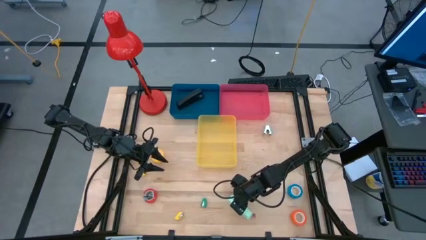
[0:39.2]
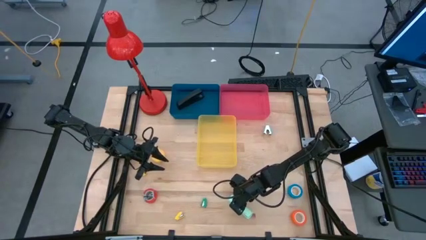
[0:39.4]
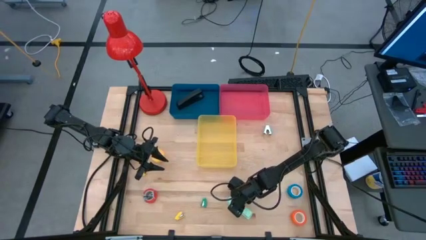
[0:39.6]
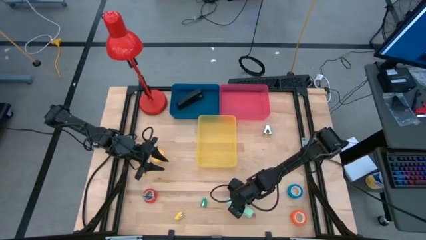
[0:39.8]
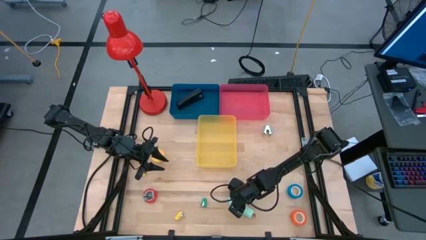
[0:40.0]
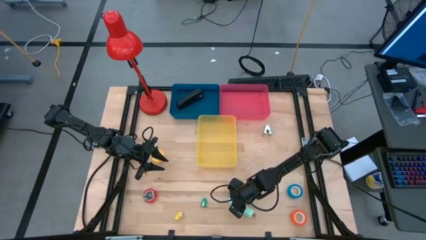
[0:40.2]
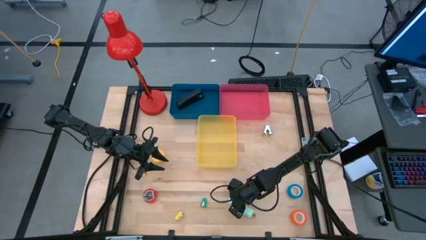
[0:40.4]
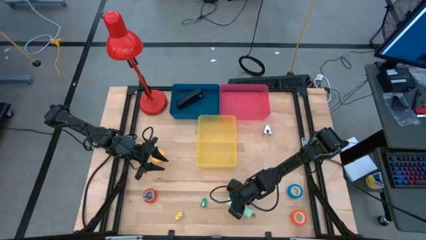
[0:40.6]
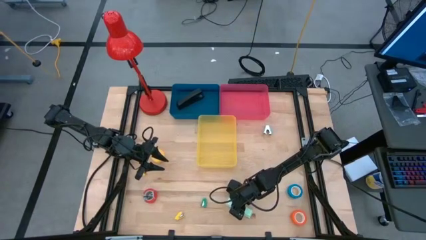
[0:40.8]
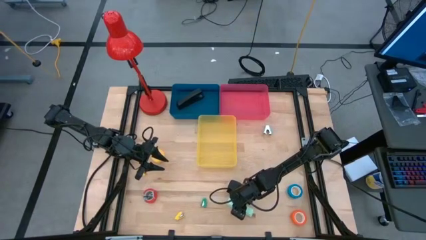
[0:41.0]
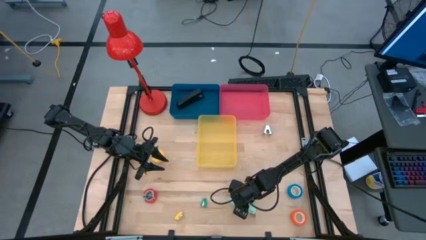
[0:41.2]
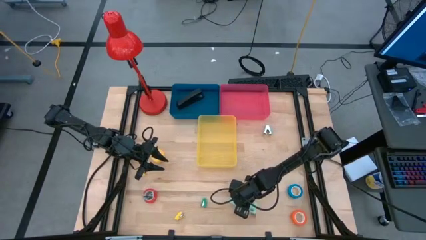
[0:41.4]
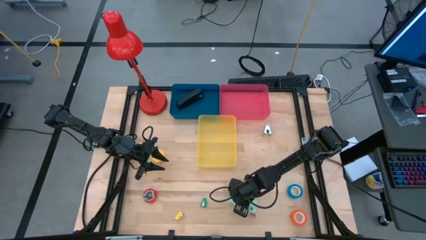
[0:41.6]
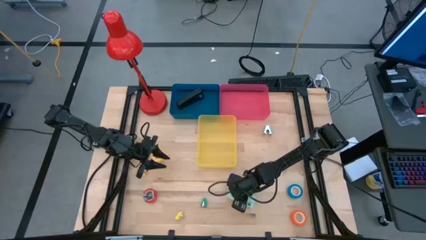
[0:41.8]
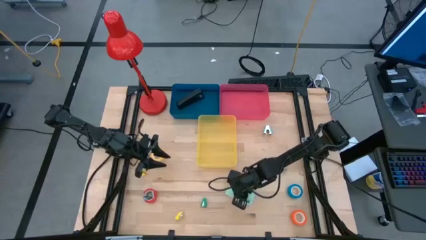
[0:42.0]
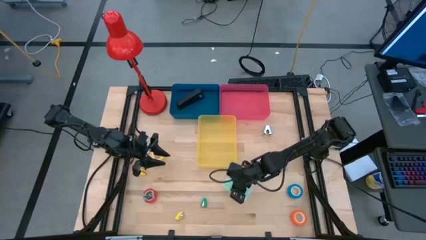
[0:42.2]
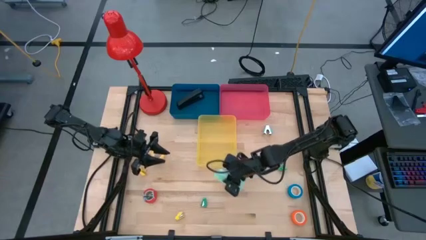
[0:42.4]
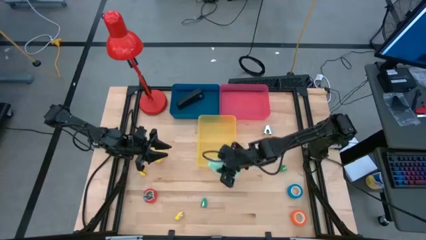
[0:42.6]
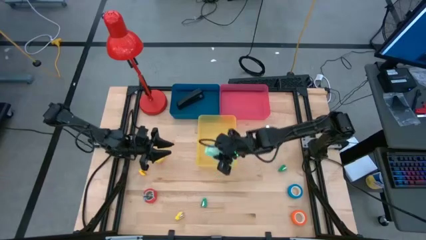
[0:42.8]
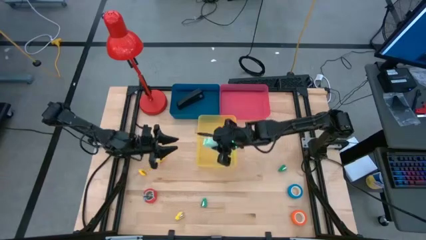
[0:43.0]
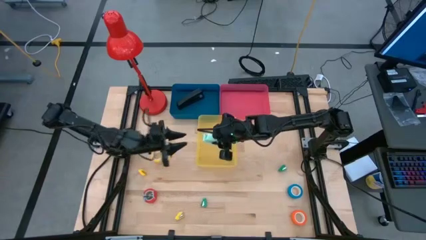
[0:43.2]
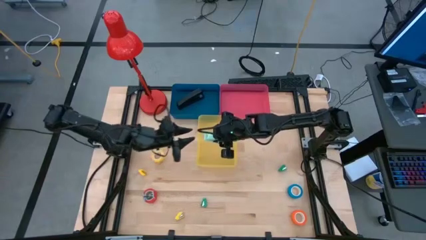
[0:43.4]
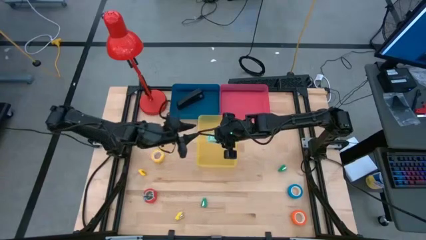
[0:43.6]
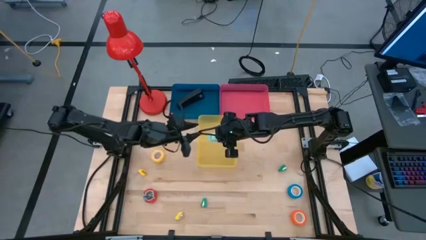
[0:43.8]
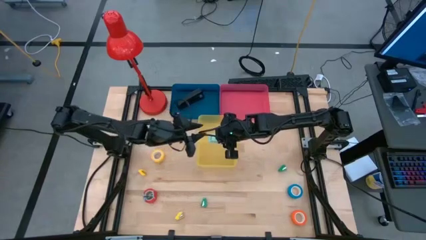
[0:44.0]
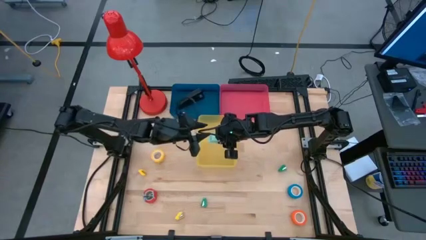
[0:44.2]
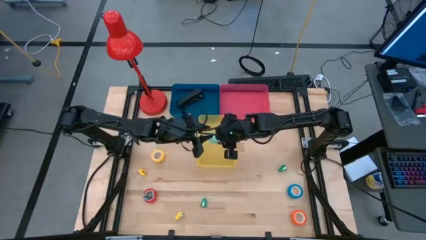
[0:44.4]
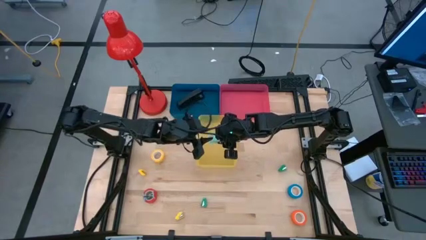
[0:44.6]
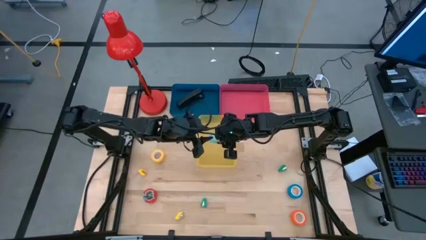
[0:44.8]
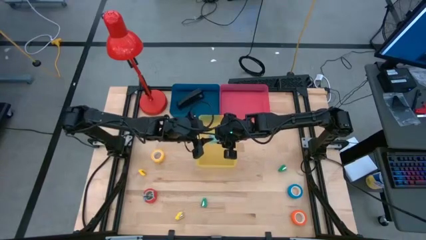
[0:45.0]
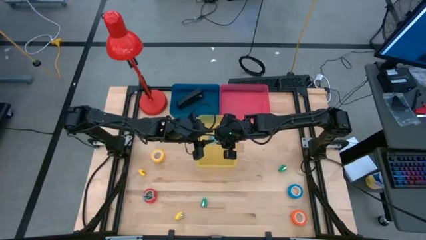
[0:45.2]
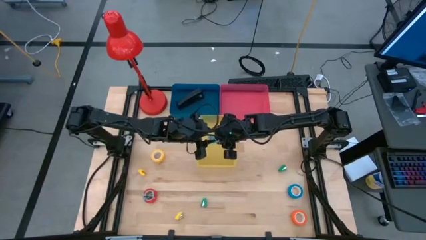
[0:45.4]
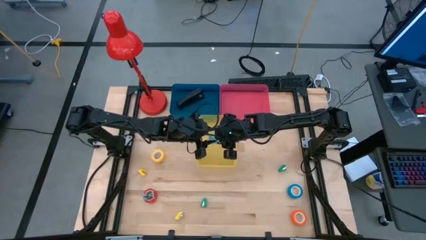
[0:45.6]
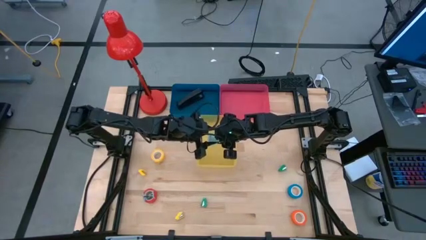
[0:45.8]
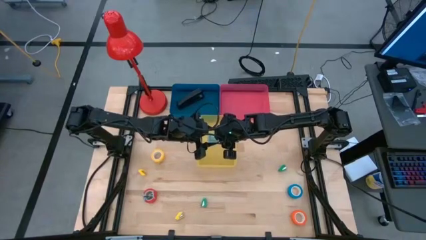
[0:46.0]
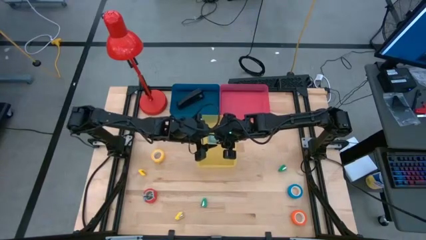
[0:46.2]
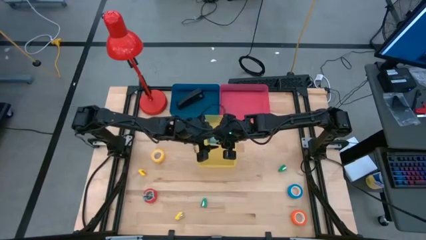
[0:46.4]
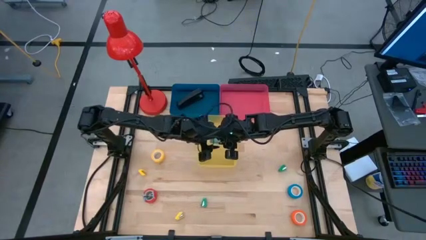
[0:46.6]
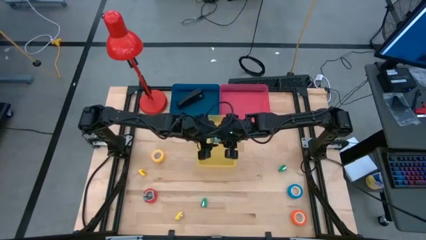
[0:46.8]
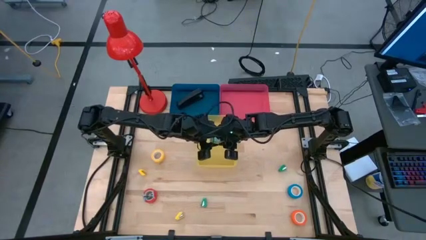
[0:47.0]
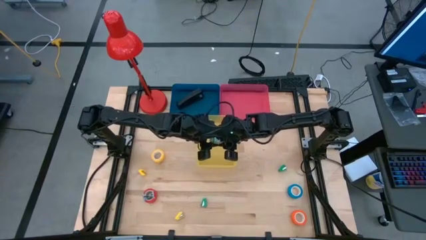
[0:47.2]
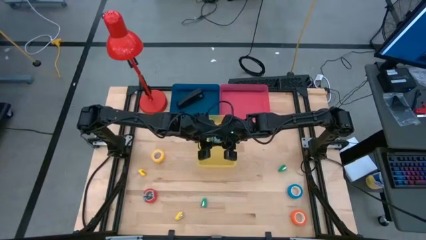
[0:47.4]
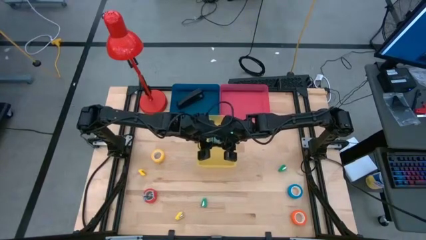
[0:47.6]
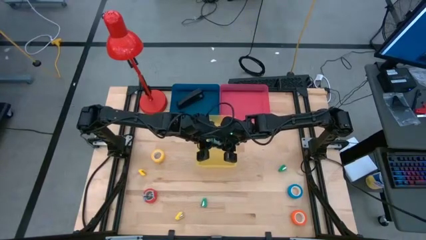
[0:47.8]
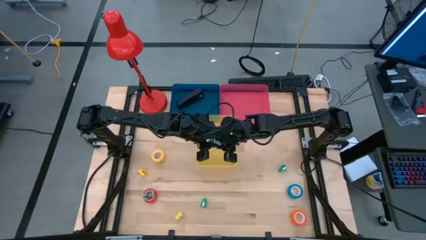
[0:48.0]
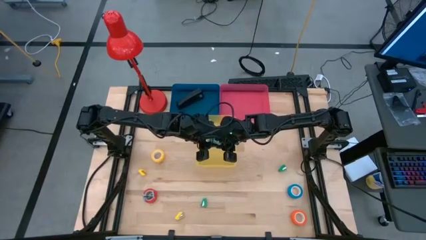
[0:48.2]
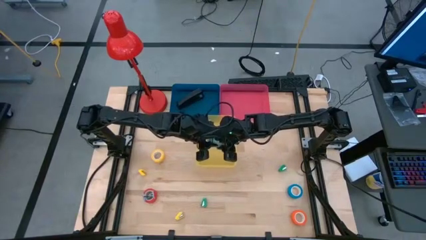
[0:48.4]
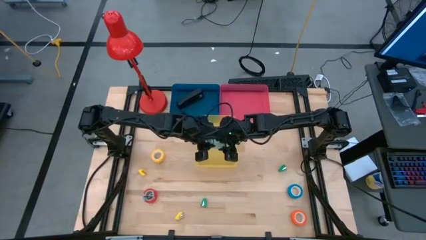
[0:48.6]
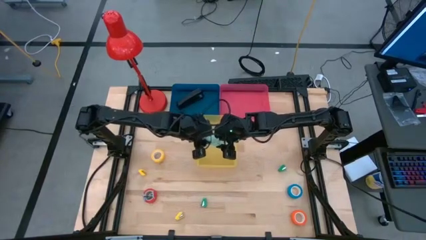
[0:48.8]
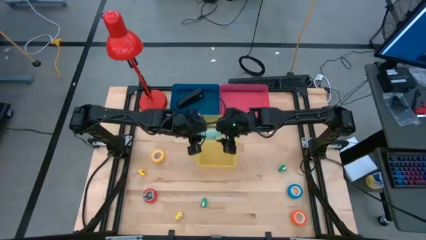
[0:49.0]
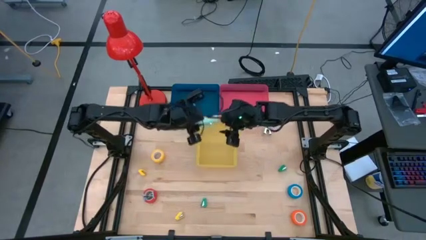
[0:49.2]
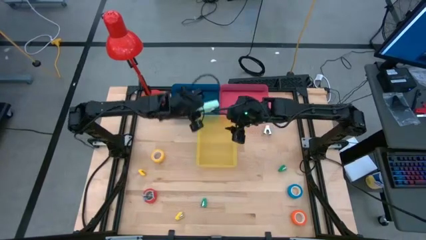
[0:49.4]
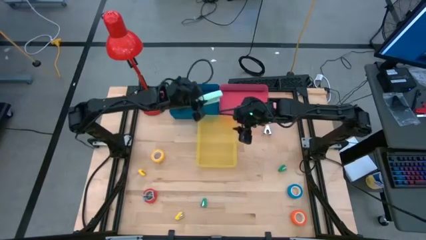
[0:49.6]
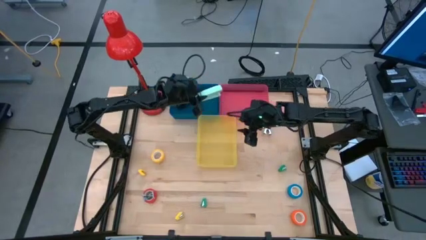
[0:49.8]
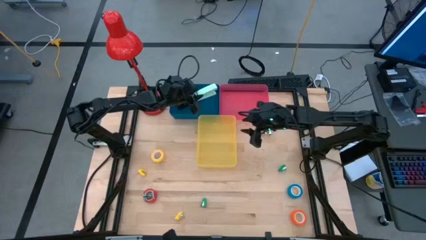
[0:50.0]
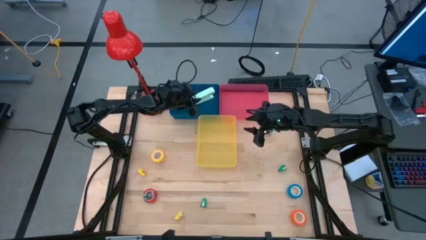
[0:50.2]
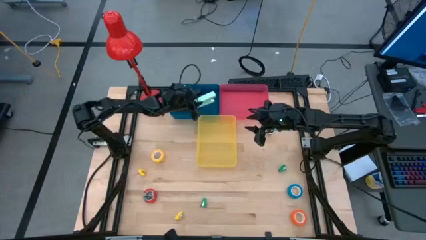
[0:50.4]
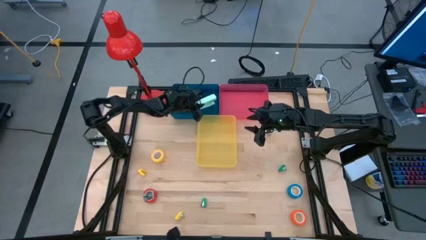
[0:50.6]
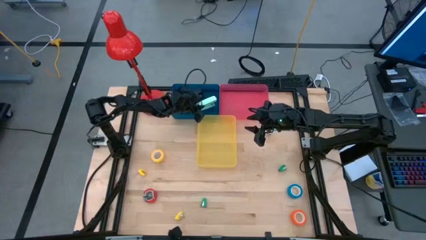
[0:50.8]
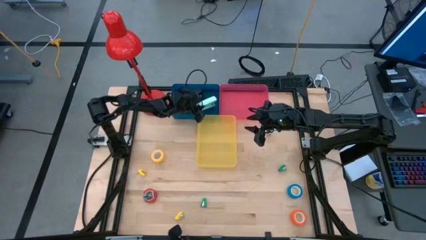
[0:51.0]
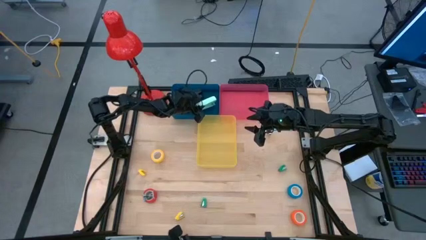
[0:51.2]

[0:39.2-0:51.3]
Task: Pick and place Stapler, Stapler remover, tape
Put the light blue stapler into the blue bin

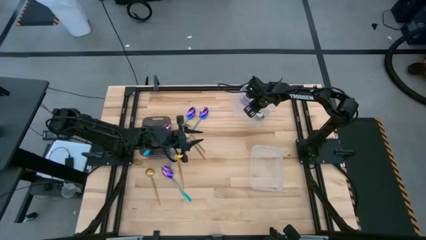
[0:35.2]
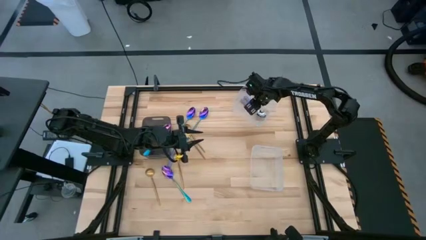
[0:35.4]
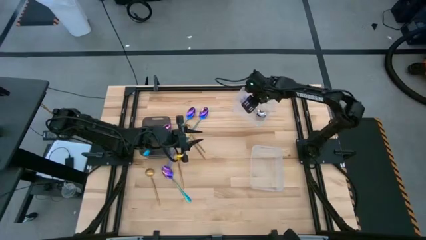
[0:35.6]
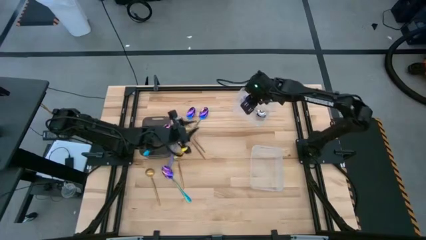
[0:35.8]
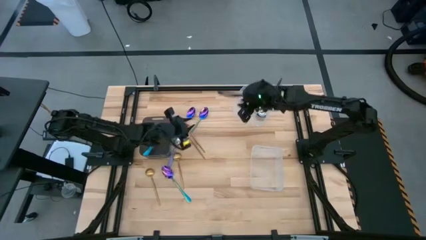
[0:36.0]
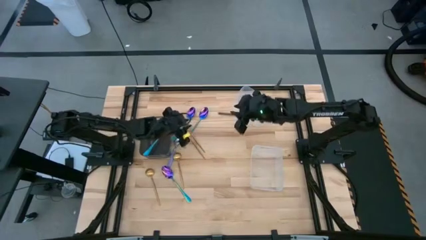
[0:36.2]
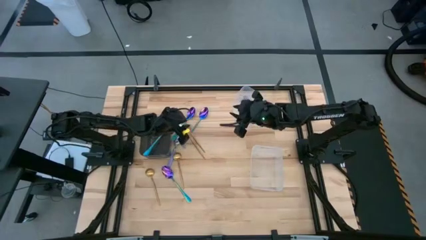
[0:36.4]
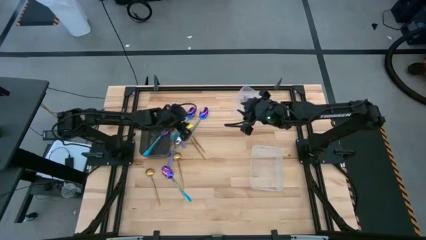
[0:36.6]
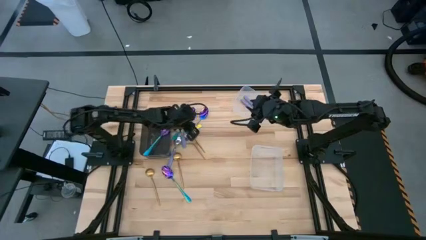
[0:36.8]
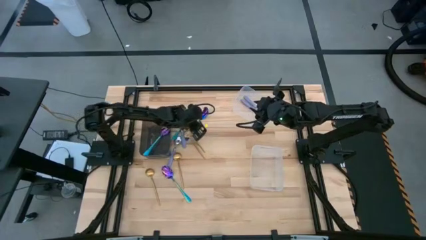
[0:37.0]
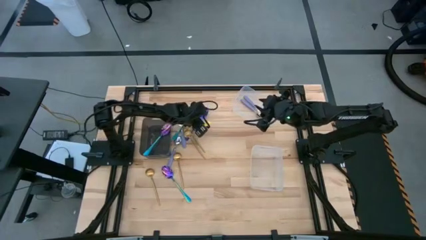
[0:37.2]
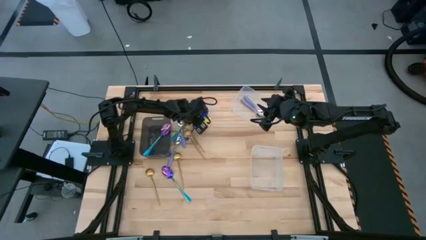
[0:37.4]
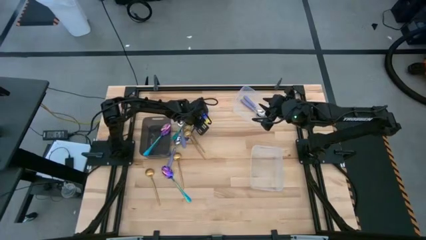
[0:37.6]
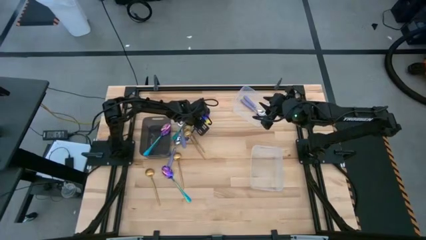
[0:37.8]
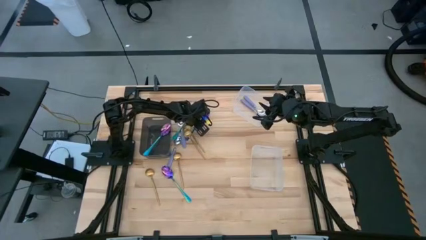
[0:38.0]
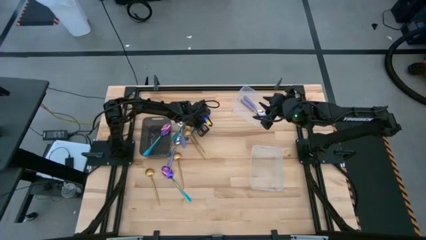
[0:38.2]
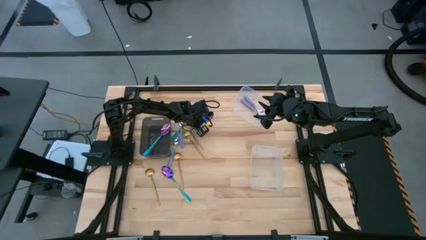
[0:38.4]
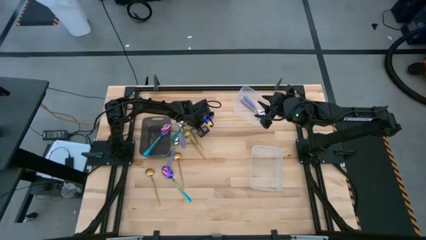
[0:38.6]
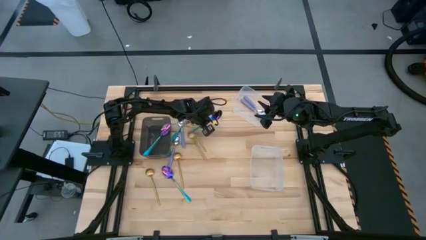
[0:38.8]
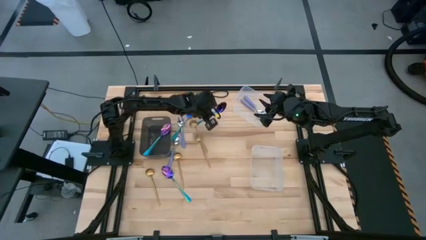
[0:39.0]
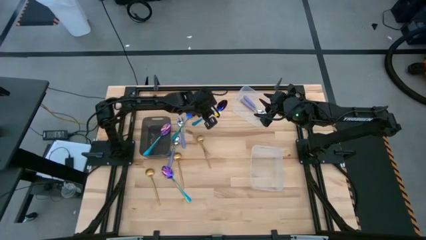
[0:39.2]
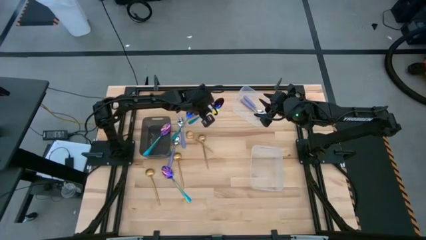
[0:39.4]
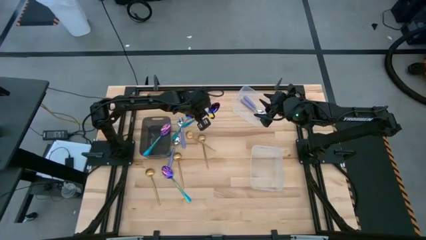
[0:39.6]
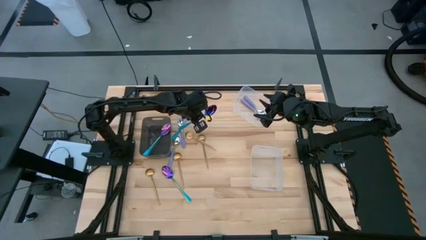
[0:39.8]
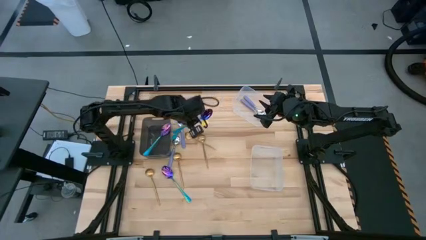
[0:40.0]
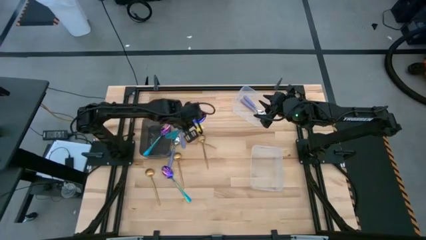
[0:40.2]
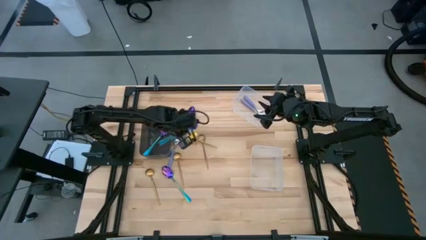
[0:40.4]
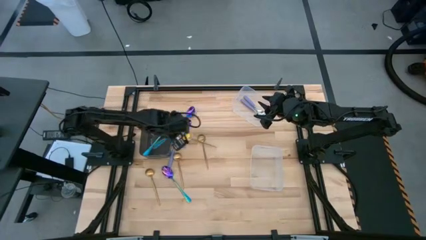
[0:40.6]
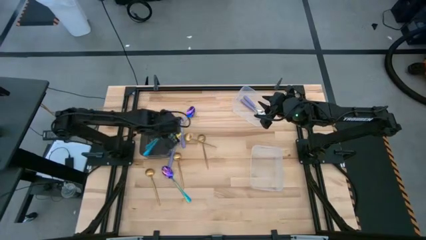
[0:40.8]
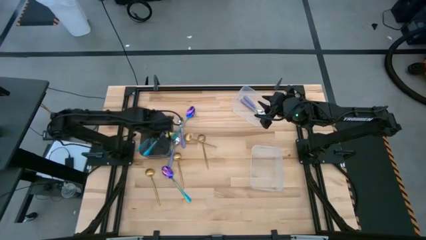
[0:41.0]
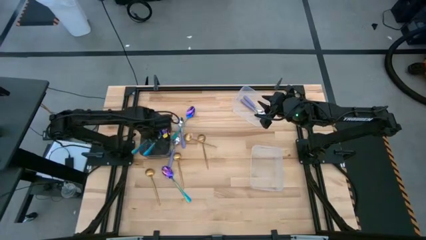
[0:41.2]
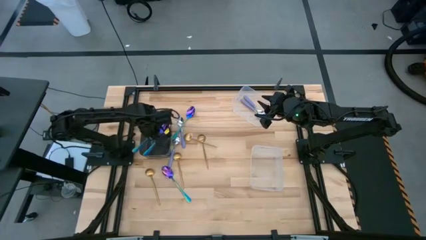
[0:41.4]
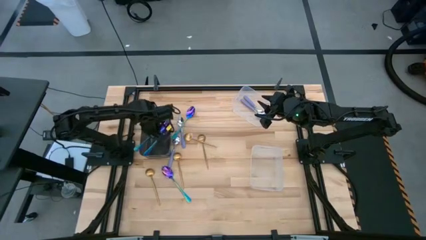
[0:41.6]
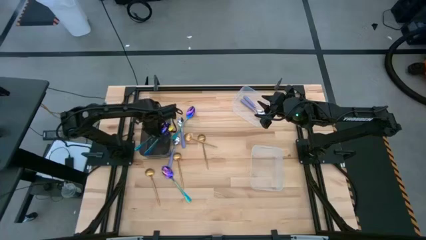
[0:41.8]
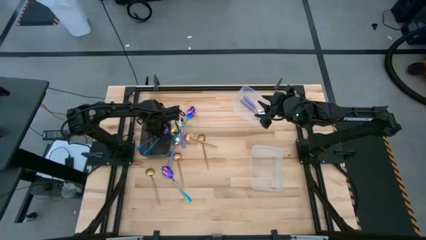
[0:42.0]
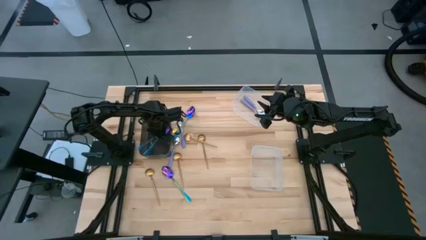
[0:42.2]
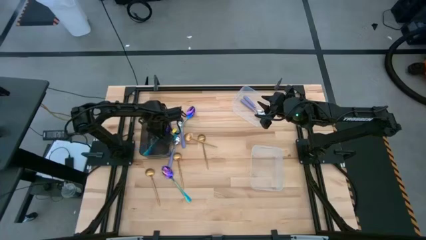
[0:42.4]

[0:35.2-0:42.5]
Task: Sort silverware by color (type)
Put the blue spoon into the black bin
